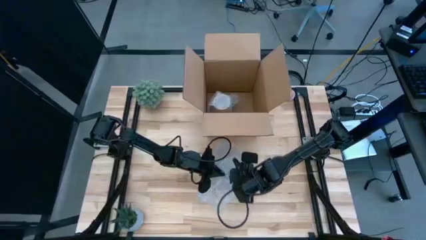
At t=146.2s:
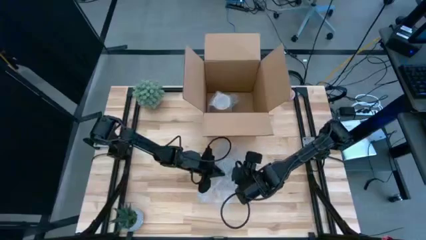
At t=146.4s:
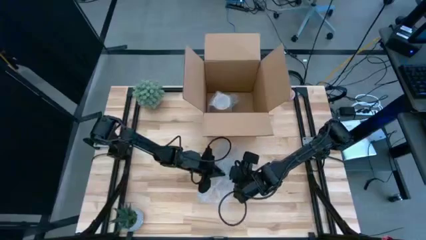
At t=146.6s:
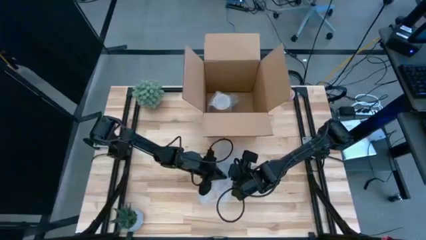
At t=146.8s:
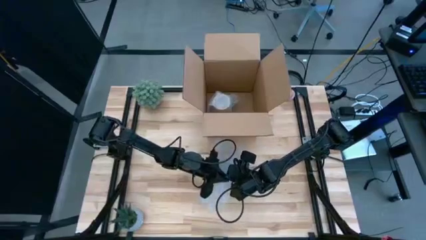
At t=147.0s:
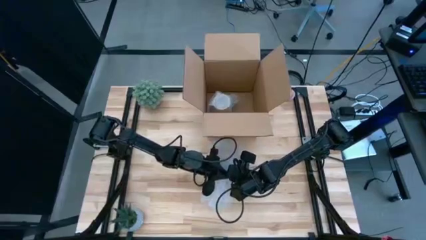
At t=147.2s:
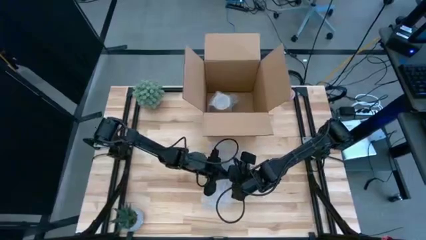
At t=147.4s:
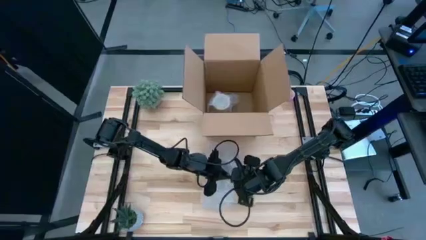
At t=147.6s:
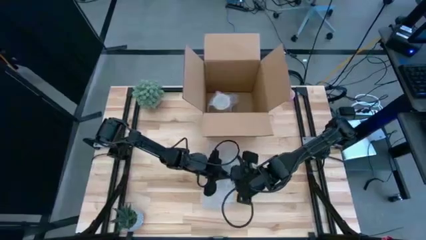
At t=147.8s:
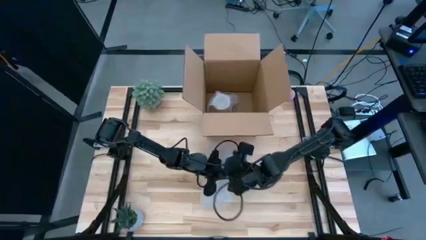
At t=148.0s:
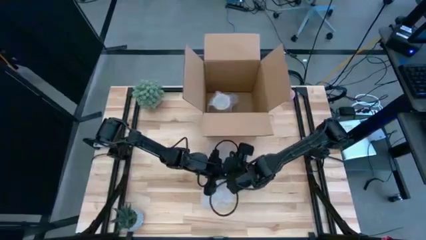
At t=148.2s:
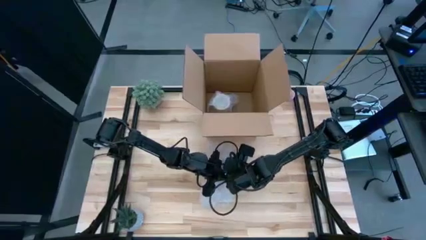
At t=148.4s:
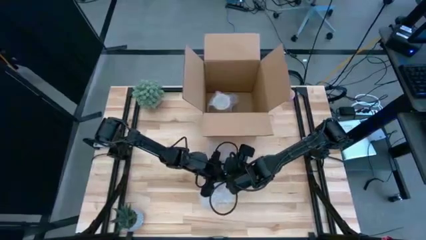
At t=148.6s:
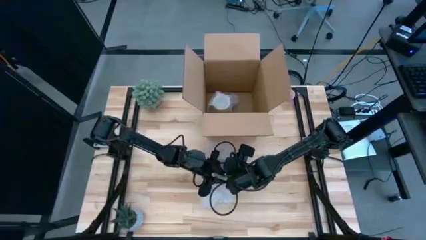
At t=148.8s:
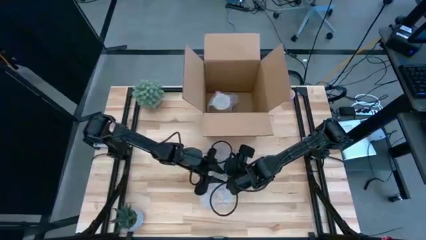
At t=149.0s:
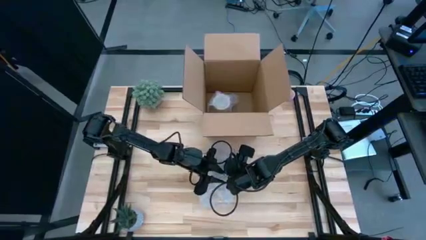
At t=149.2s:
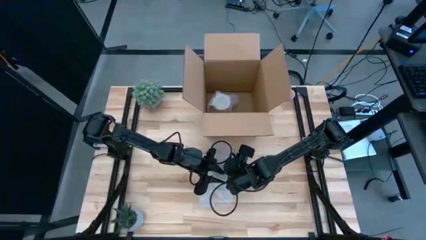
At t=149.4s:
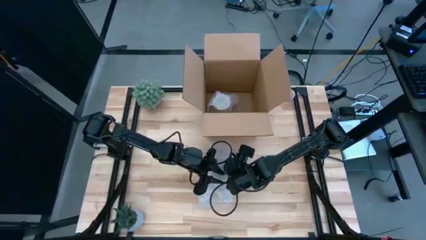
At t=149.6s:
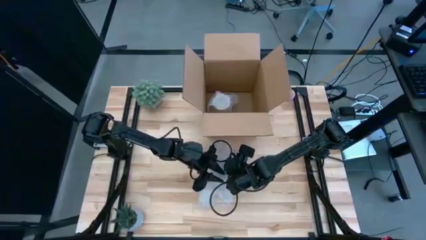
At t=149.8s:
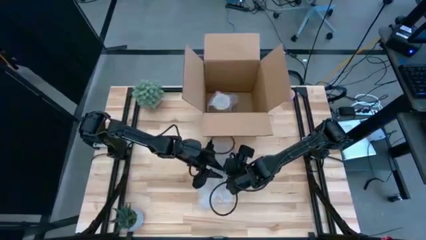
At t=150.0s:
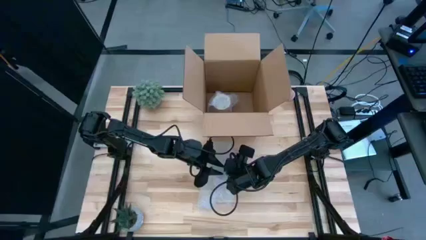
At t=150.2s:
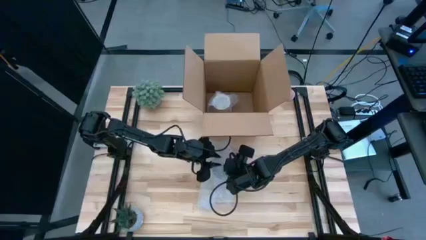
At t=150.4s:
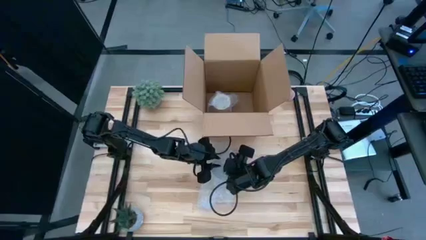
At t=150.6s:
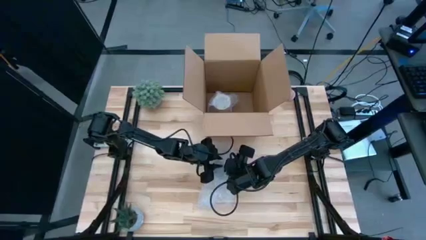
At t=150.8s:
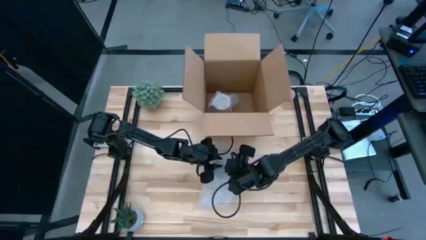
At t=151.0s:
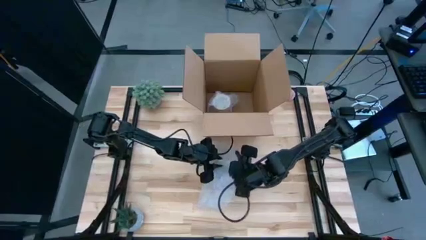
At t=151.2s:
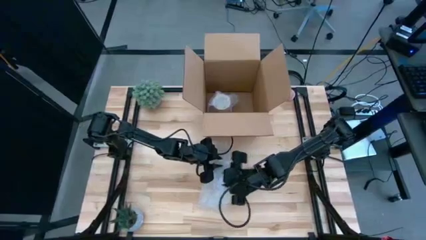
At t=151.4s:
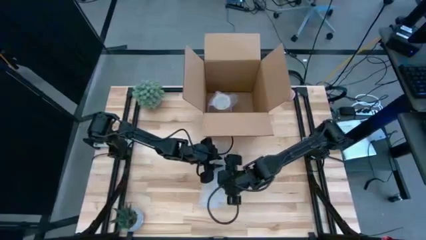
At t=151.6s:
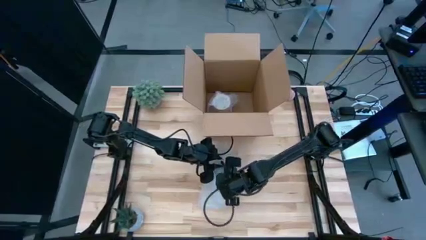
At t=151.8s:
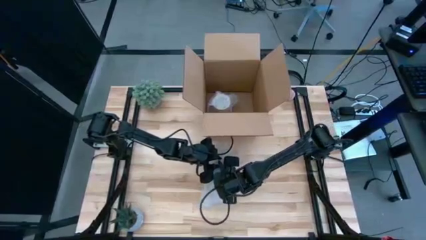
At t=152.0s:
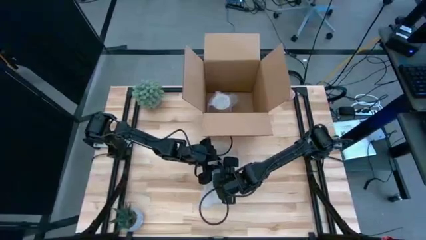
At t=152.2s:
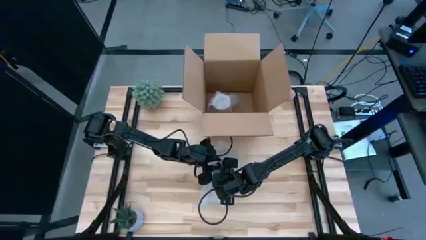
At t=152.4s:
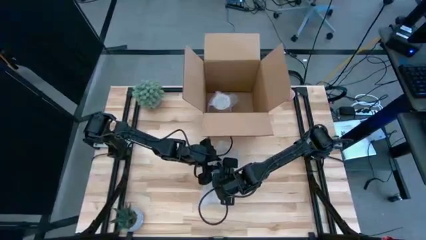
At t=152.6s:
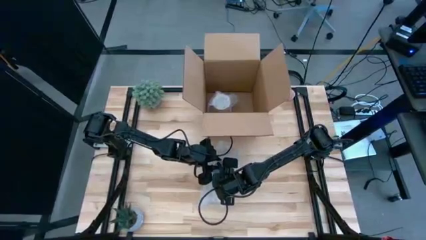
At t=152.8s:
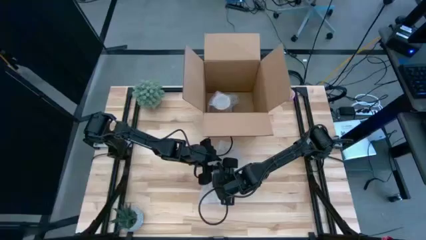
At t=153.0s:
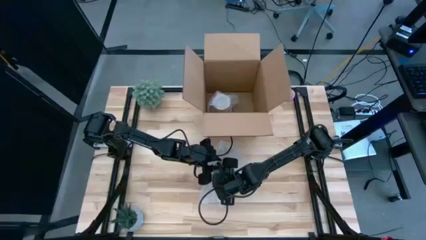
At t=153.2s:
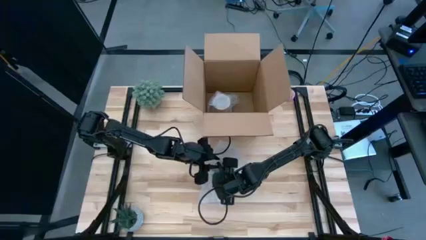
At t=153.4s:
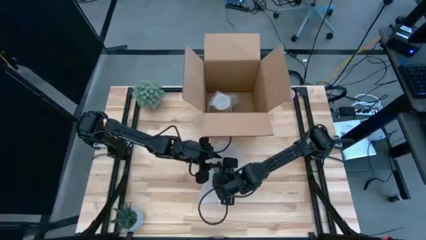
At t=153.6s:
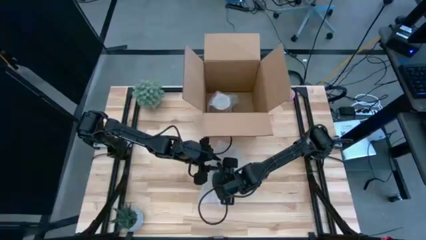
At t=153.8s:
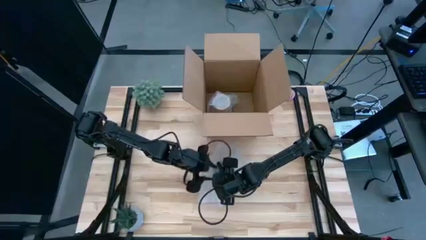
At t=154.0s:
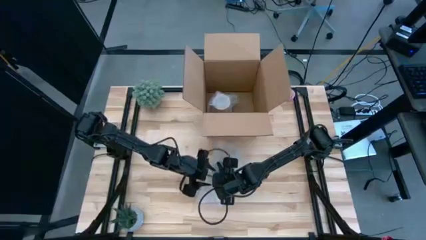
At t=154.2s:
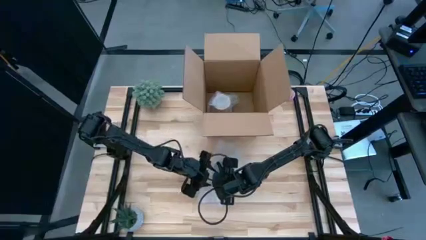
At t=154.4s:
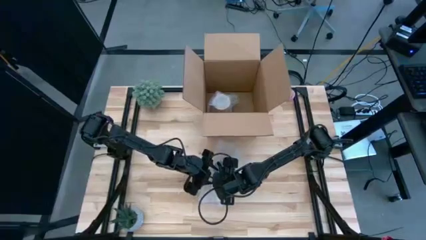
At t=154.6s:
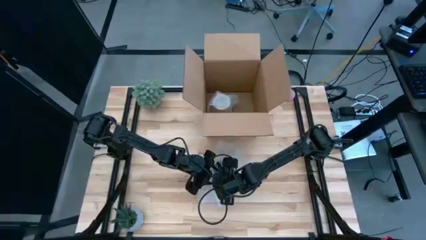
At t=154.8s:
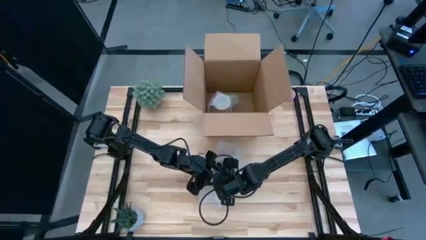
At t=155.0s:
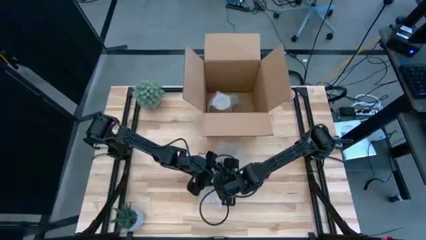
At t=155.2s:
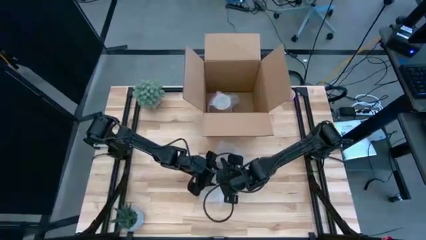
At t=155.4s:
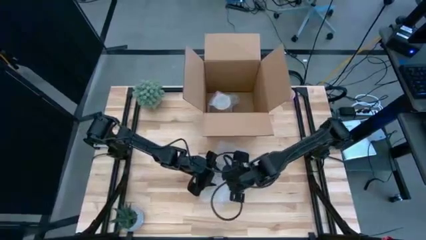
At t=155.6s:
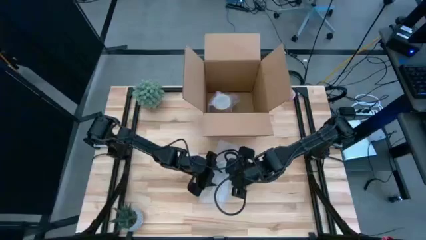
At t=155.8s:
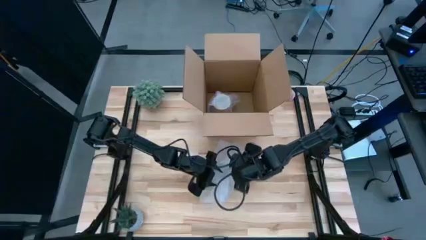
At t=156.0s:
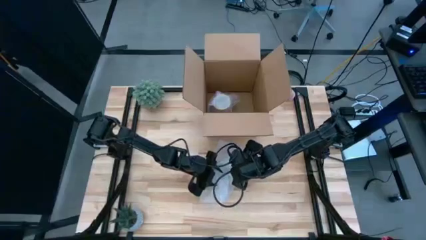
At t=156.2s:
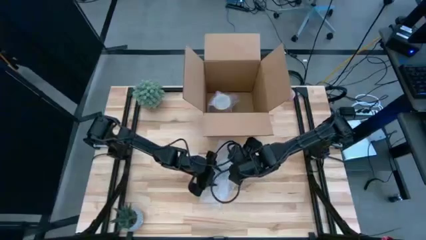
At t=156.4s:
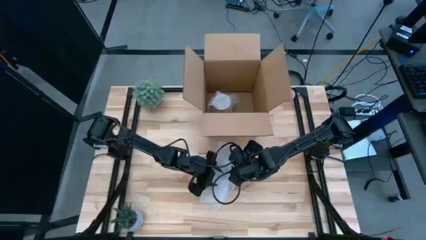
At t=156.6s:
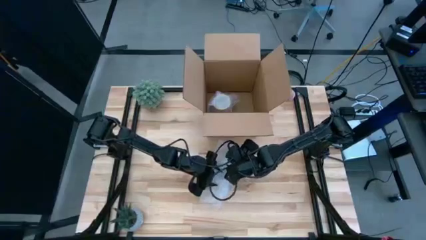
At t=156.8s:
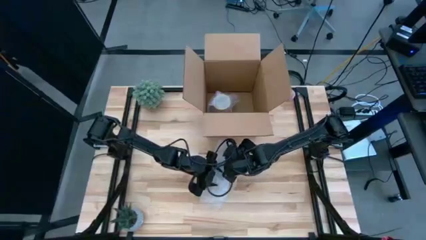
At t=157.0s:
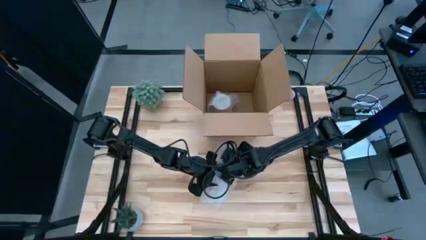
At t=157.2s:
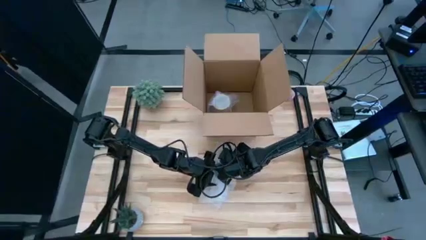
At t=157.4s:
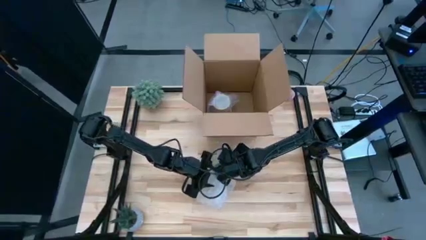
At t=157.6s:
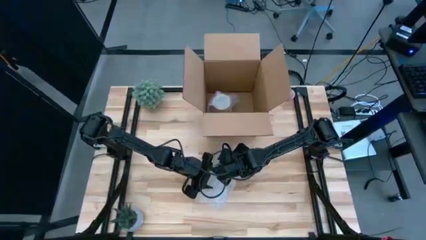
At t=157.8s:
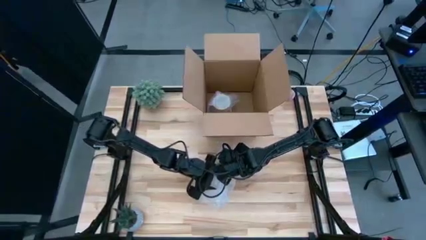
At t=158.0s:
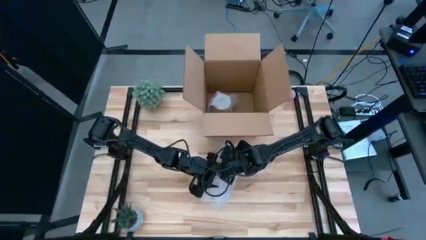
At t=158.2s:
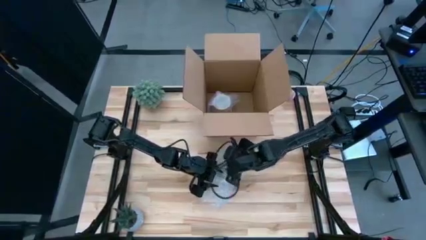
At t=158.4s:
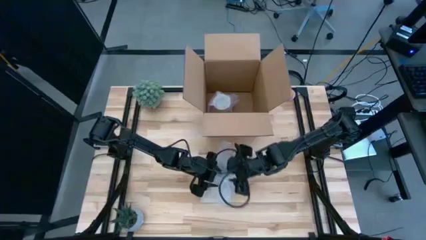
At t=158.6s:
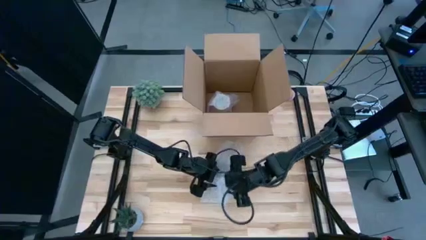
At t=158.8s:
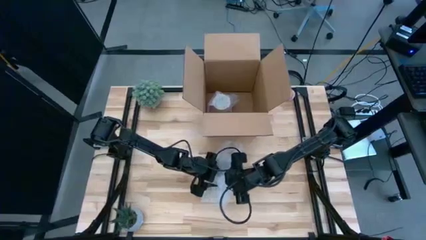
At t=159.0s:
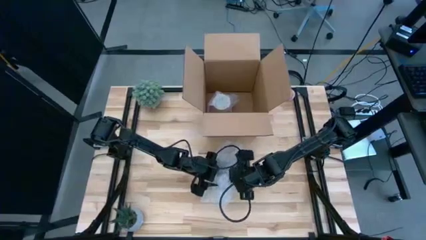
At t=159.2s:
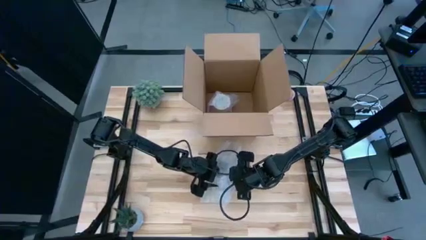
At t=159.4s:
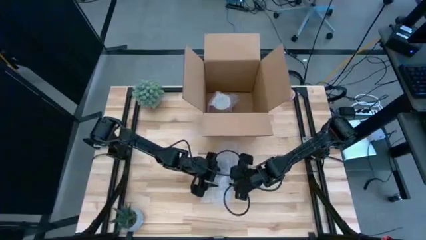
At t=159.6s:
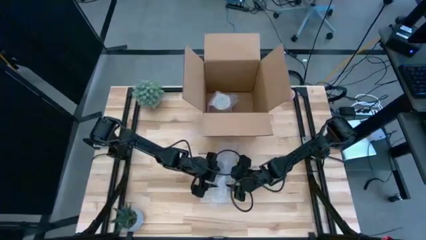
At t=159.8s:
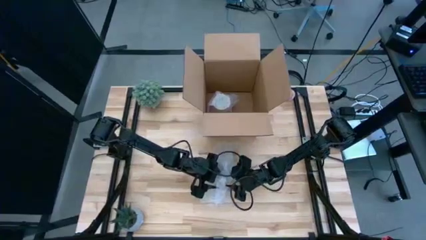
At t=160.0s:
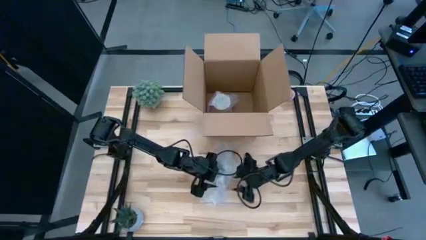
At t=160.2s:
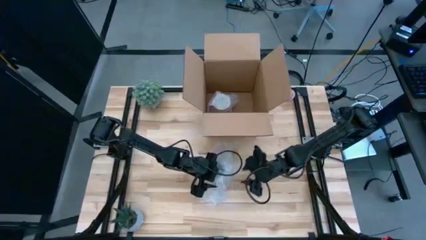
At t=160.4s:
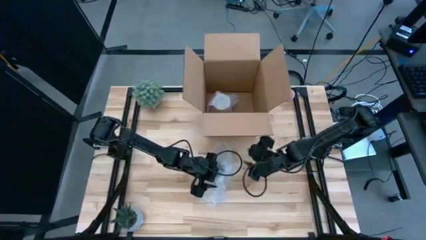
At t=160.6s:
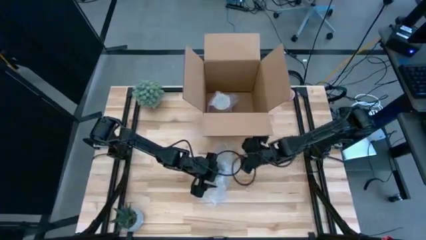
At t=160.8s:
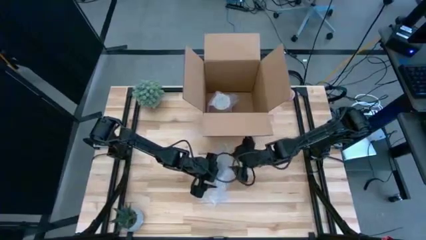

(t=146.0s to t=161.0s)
Task: wrap mug
Wrap the red mug with the bubble wrap
